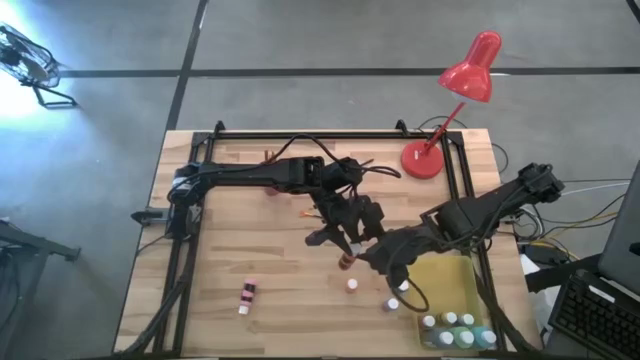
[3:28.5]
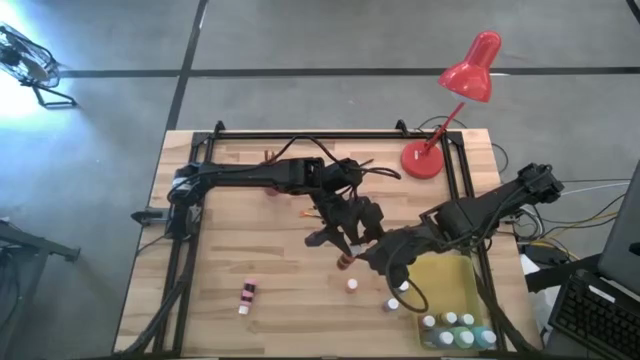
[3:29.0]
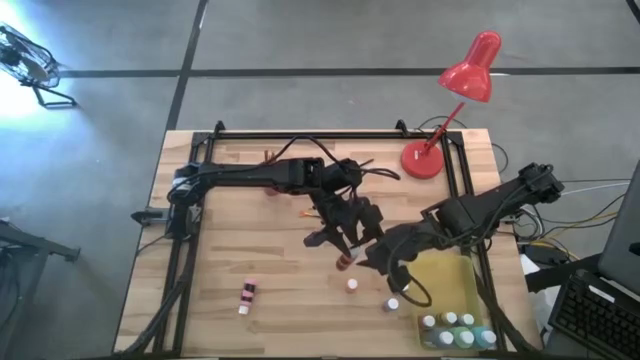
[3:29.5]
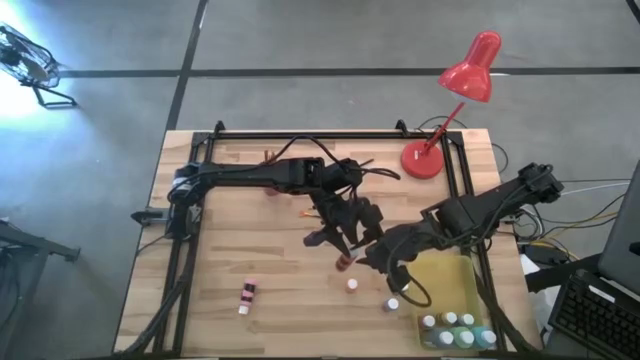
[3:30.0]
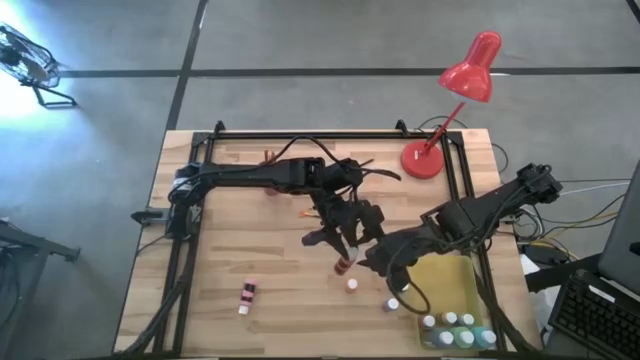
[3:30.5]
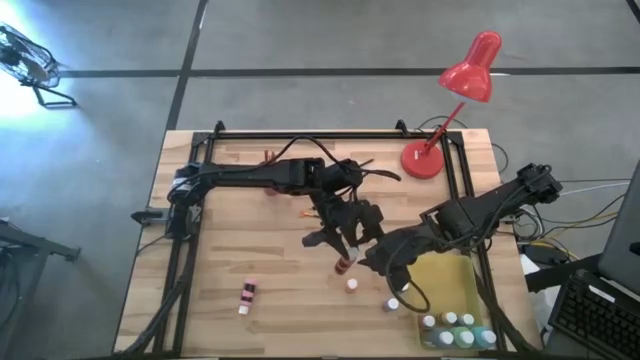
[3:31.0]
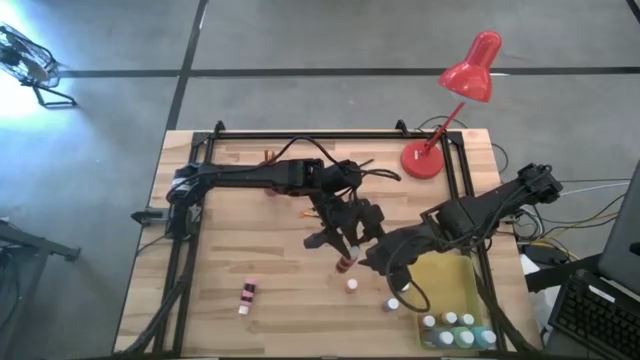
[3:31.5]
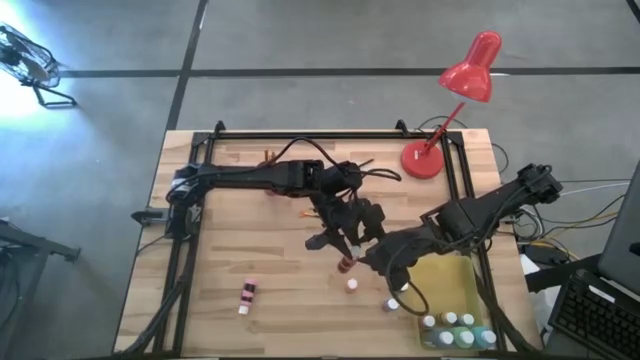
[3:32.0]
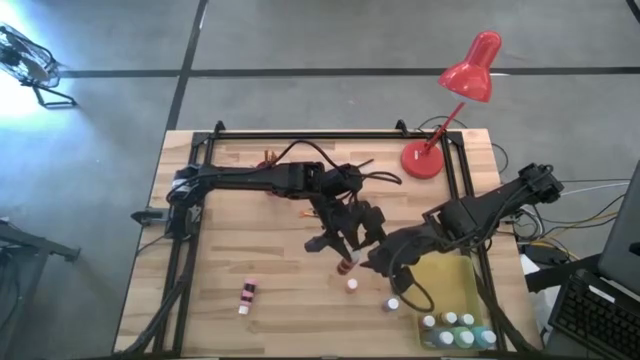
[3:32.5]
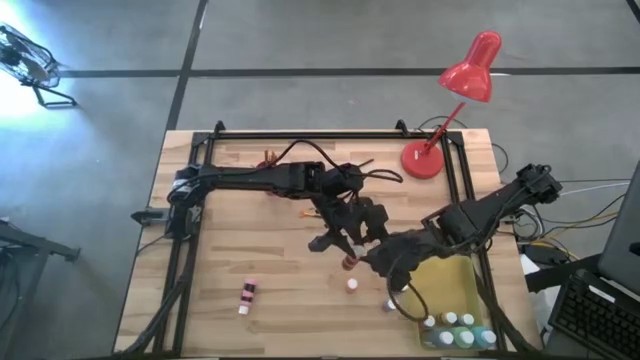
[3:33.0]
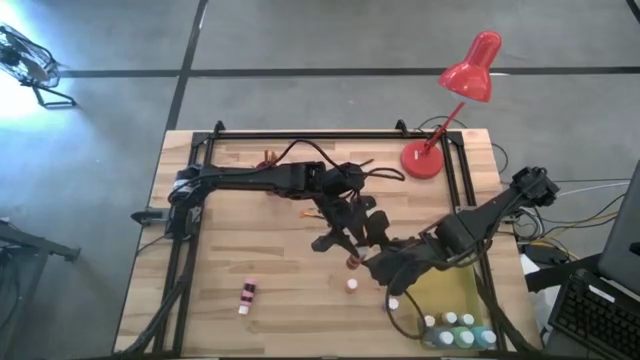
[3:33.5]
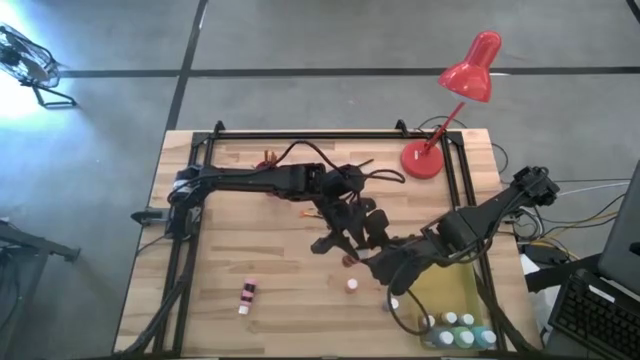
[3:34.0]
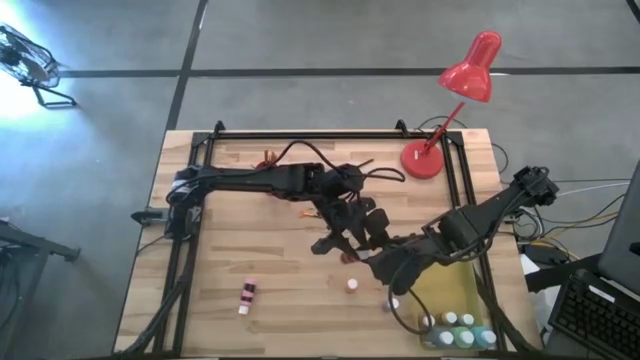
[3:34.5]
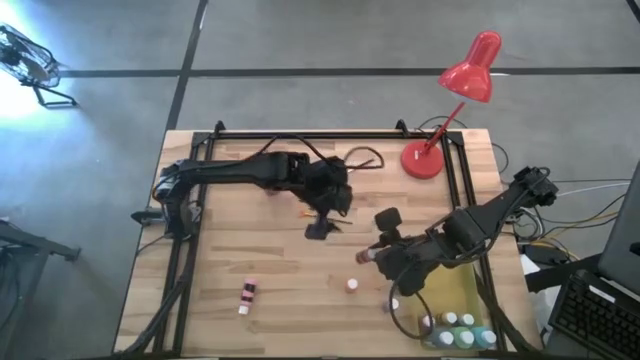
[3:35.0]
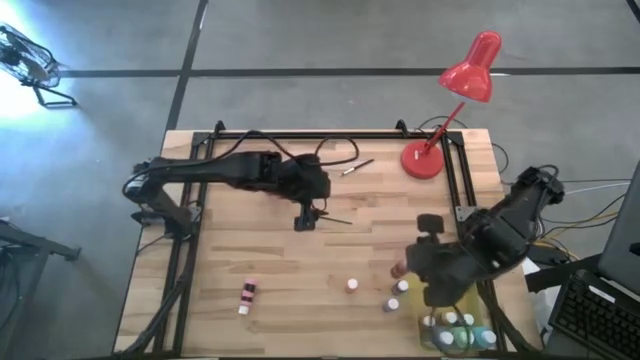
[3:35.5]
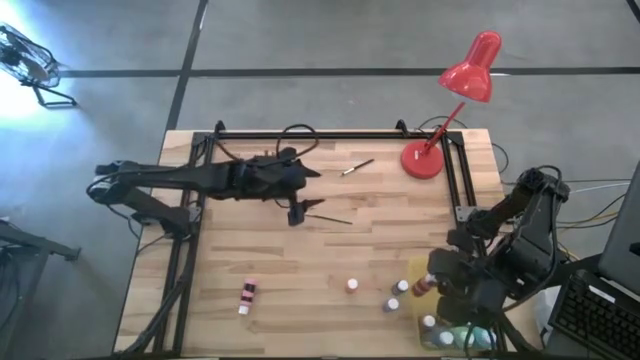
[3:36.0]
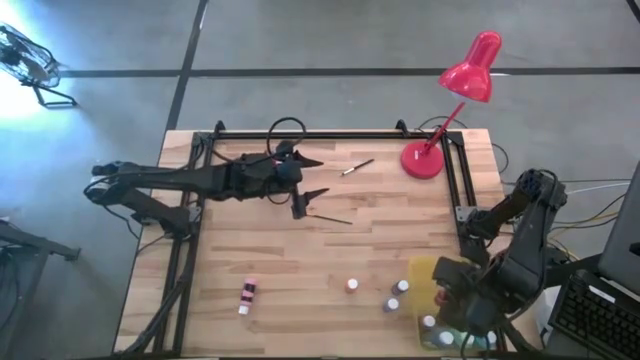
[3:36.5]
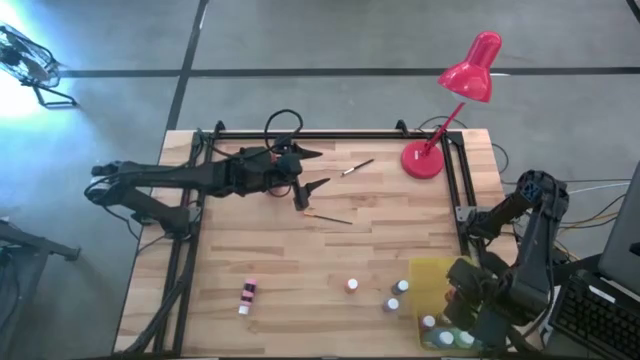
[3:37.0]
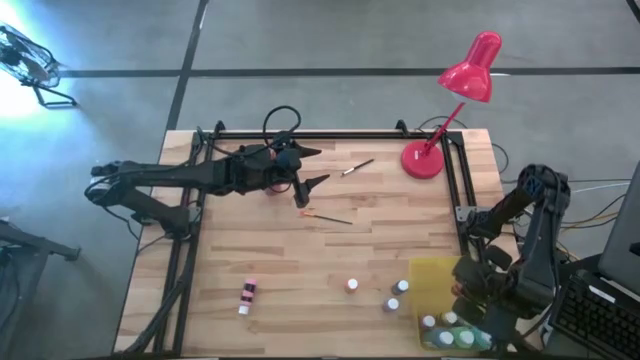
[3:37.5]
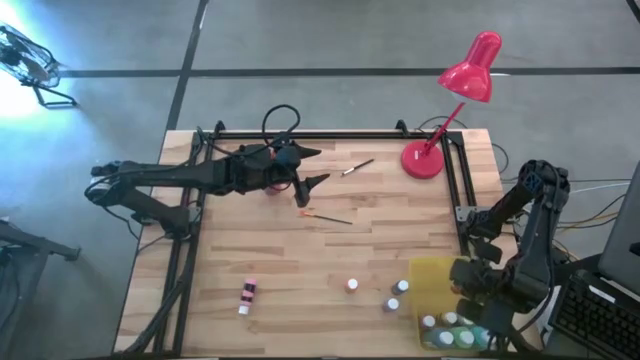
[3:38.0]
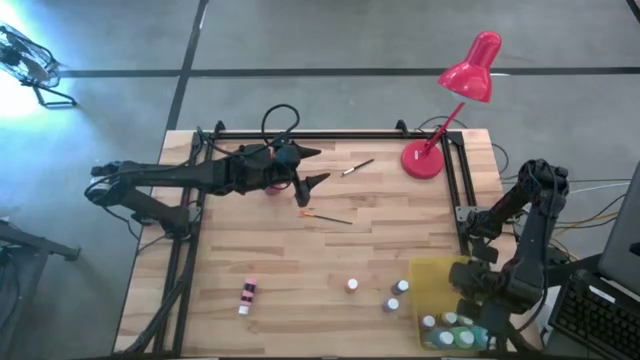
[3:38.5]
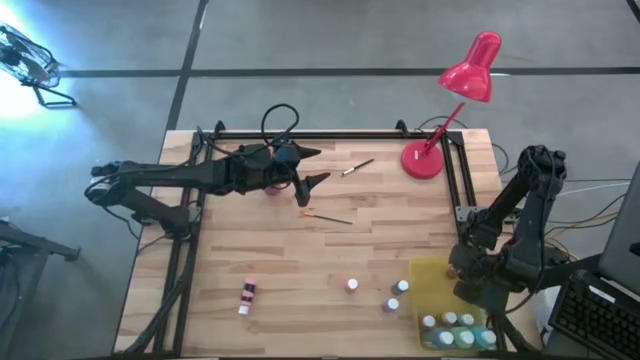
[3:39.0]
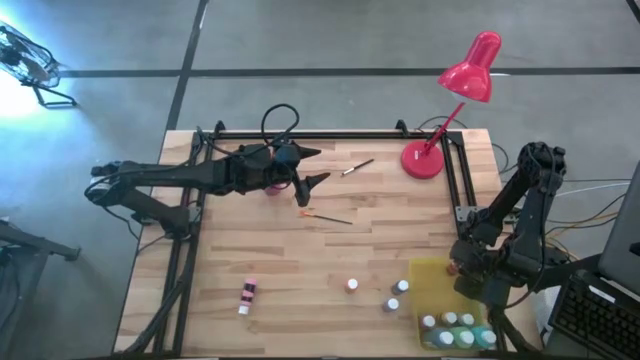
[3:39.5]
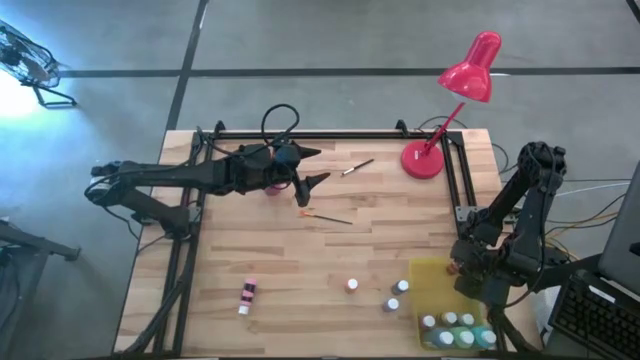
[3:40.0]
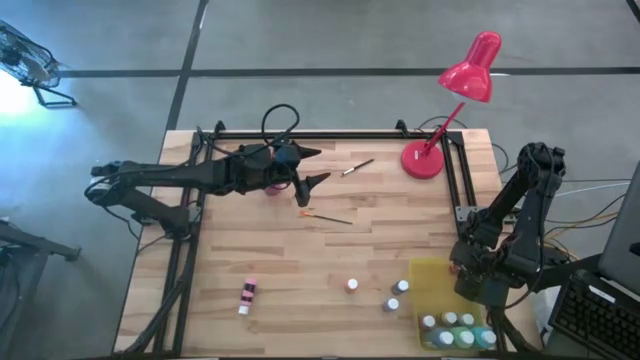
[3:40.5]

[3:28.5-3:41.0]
Task: Pick & Place Paint Supplies
Put the red paint bottle into the yellow bin

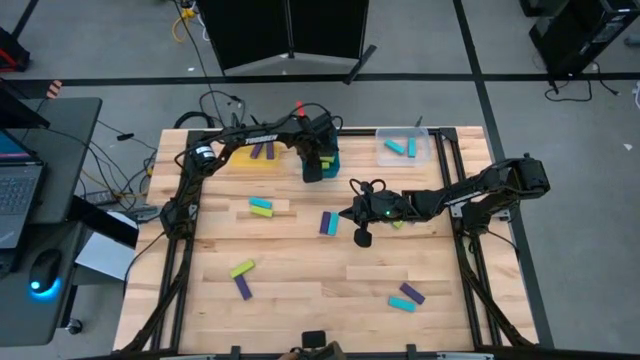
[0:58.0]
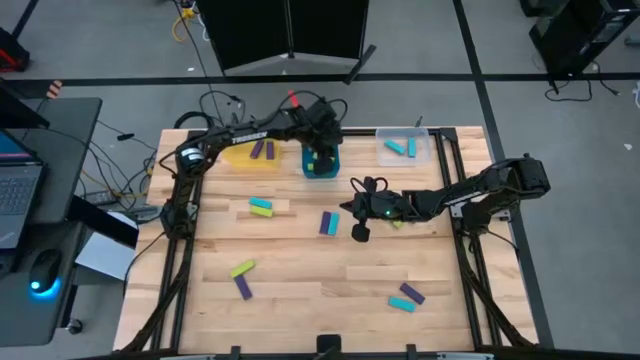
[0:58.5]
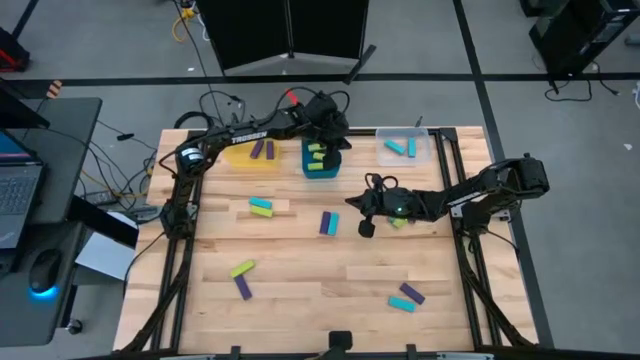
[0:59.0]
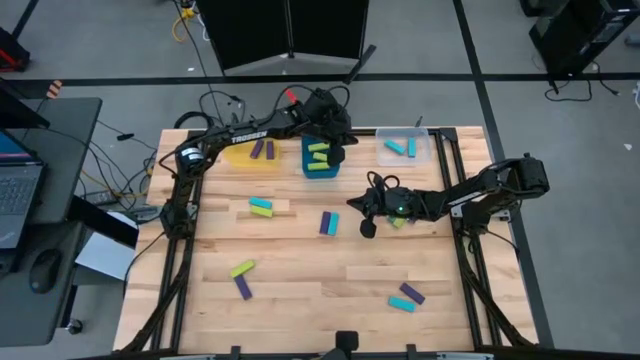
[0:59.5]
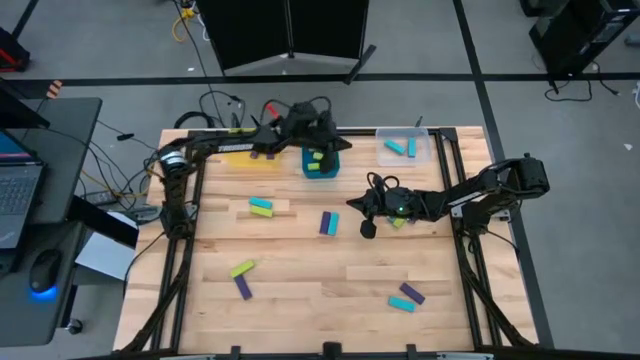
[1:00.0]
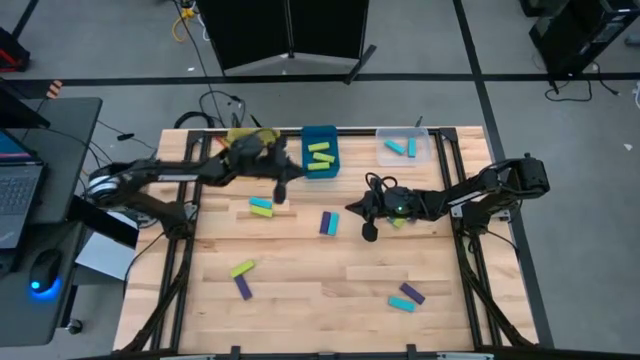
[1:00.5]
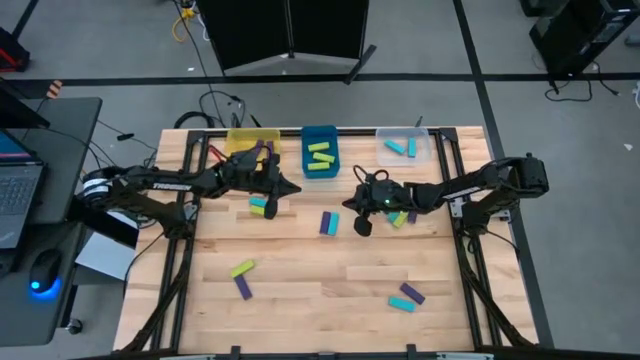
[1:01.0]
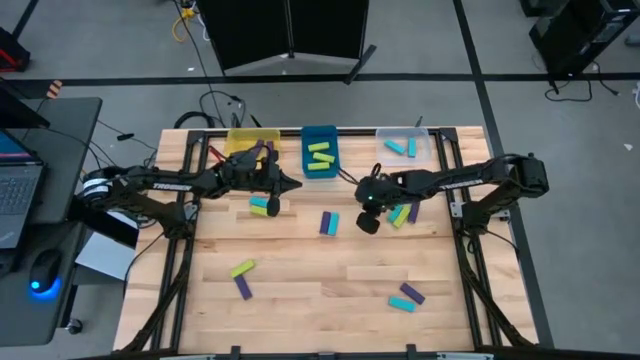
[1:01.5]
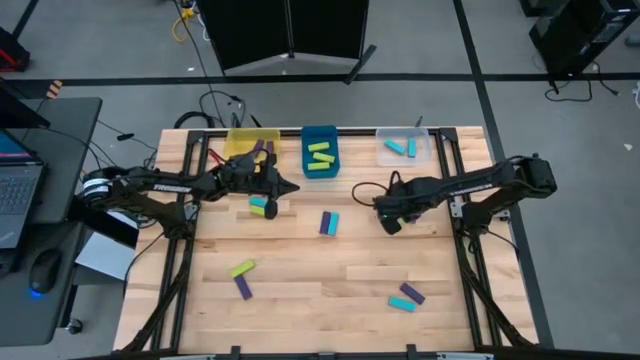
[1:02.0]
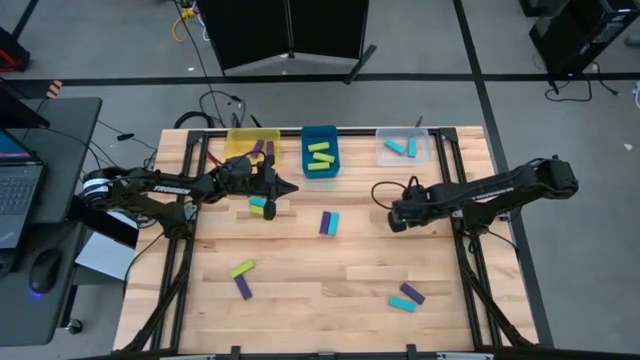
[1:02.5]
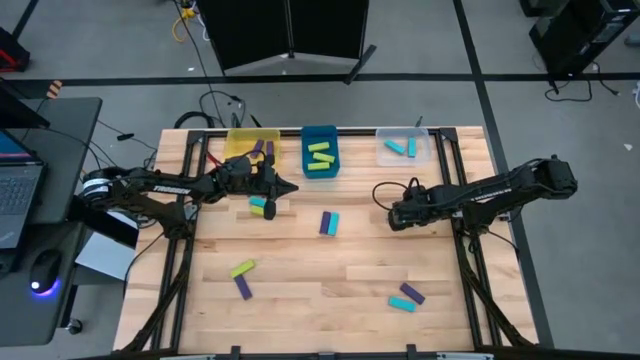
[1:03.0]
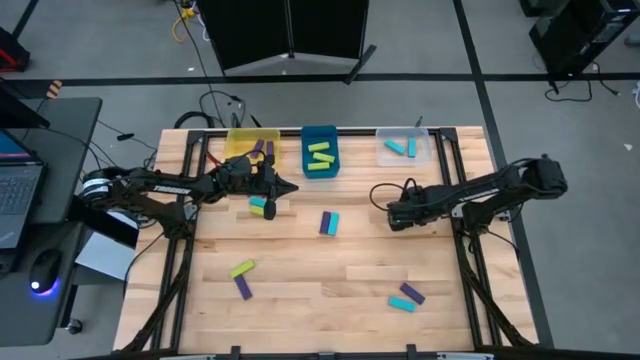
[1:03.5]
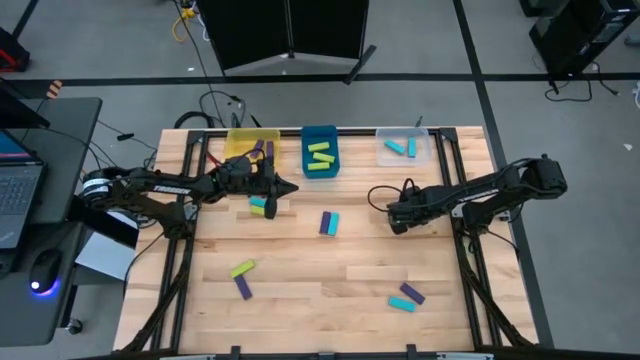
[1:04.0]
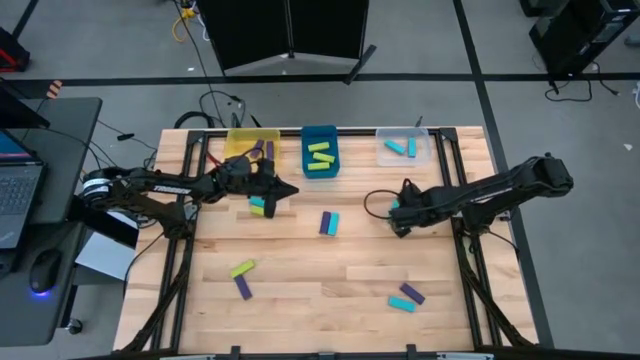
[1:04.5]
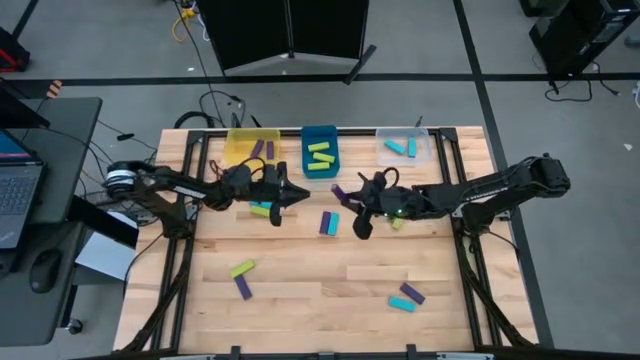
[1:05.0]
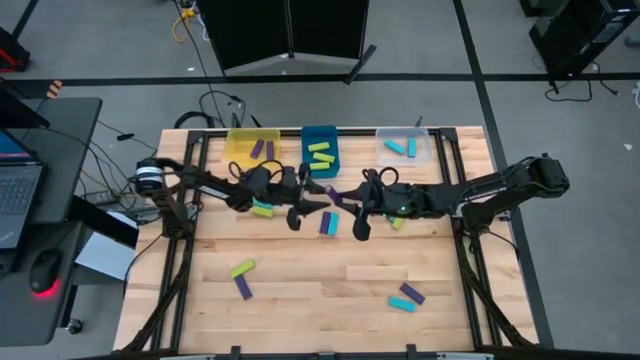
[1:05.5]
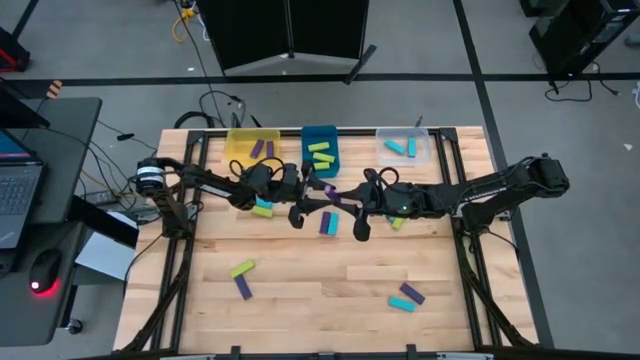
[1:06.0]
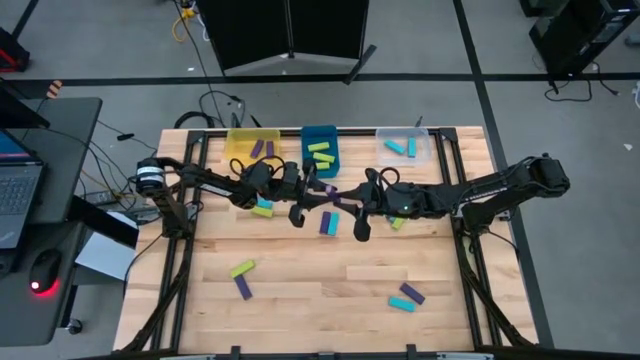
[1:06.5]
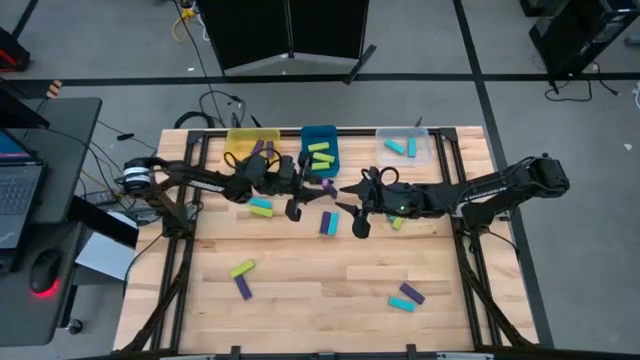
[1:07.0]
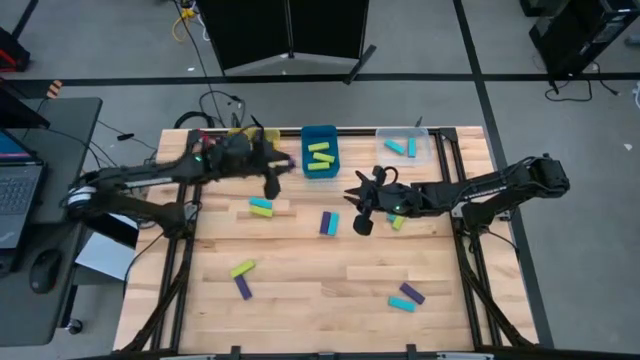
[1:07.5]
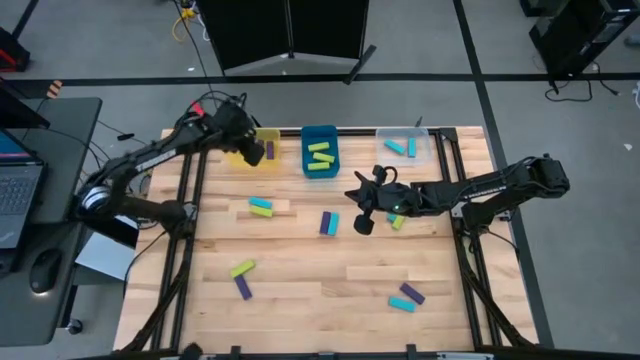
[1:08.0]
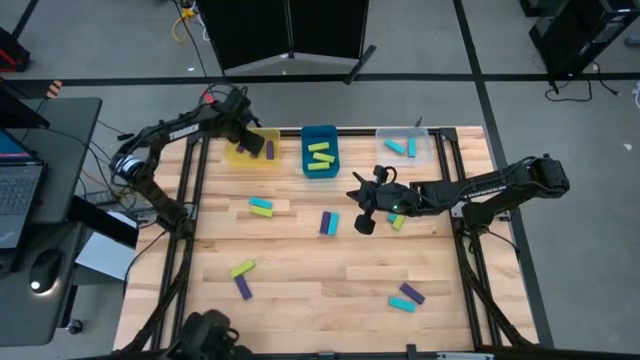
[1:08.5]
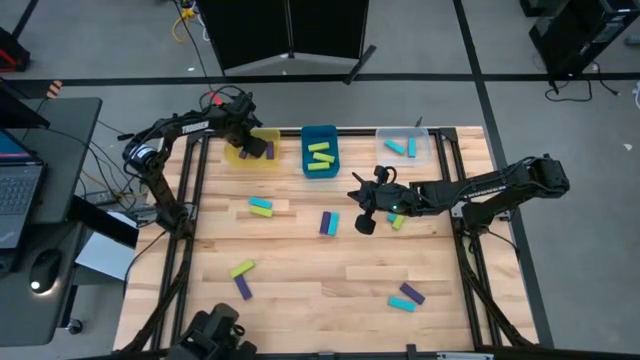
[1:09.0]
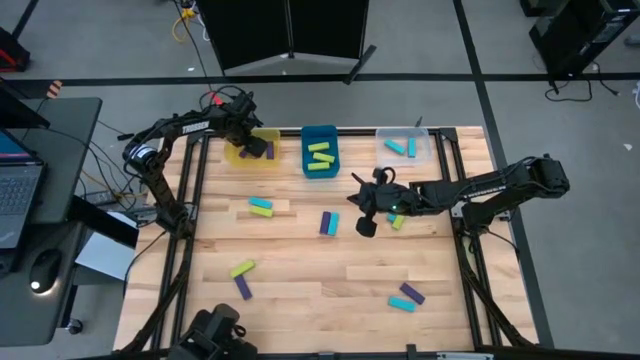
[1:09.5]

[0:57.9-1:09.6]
Task: Sort blocks
Put the violet block into the yellow bin
